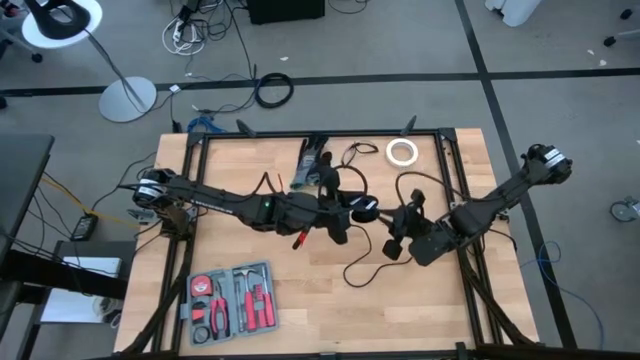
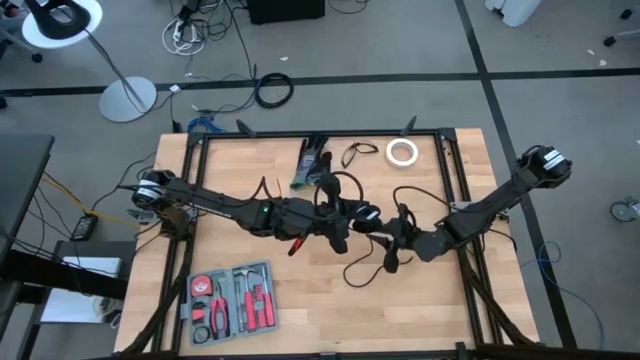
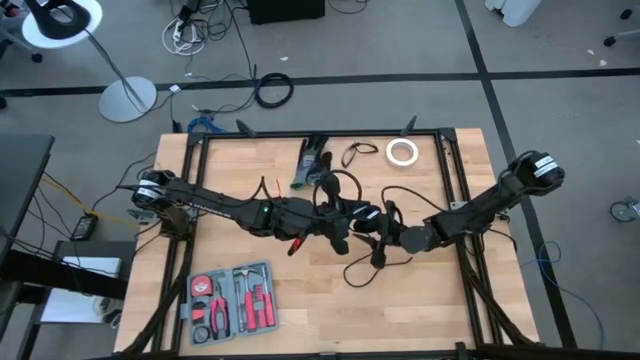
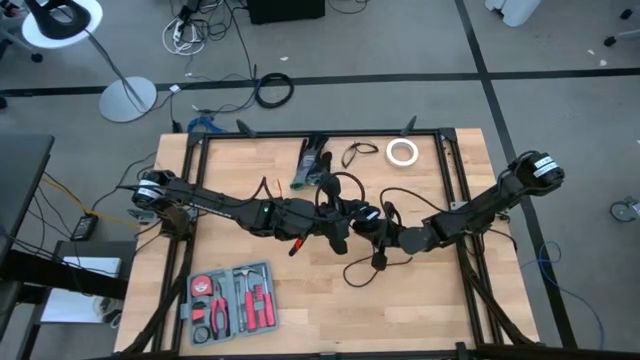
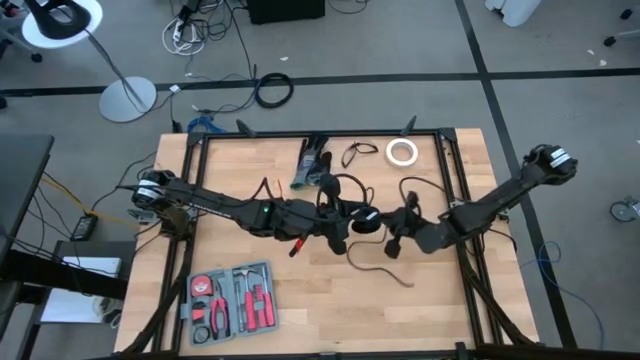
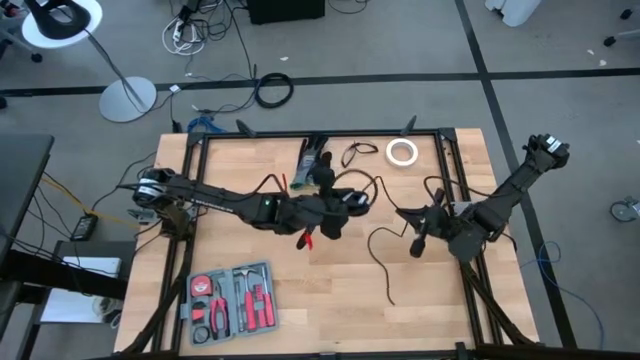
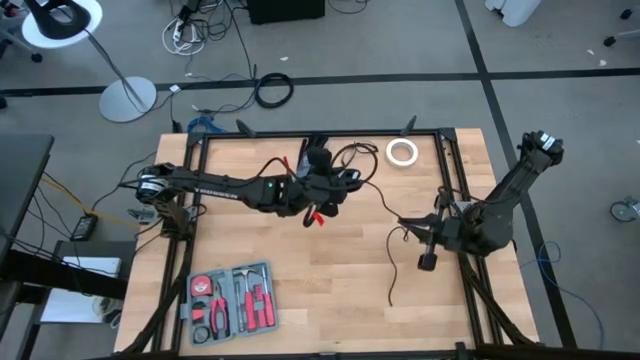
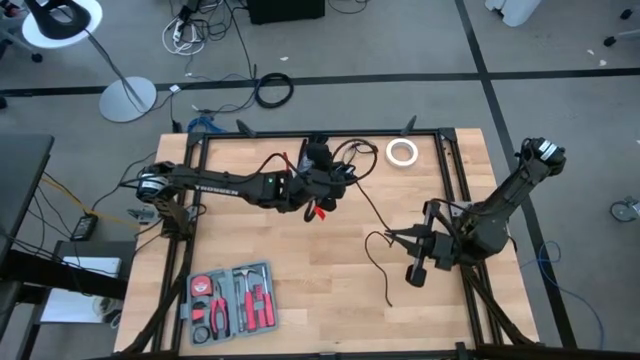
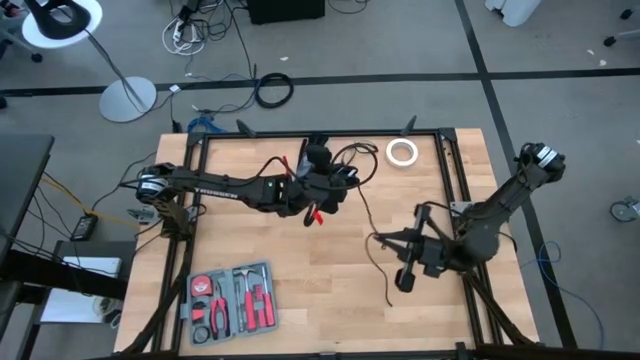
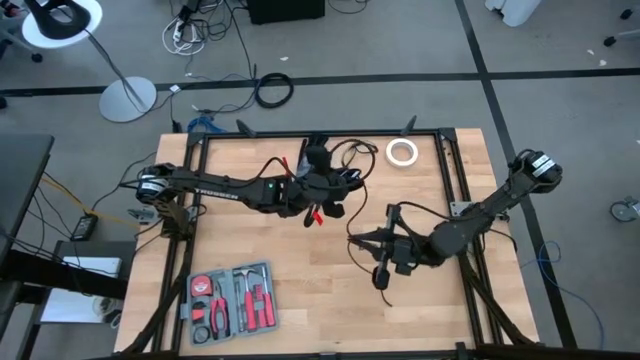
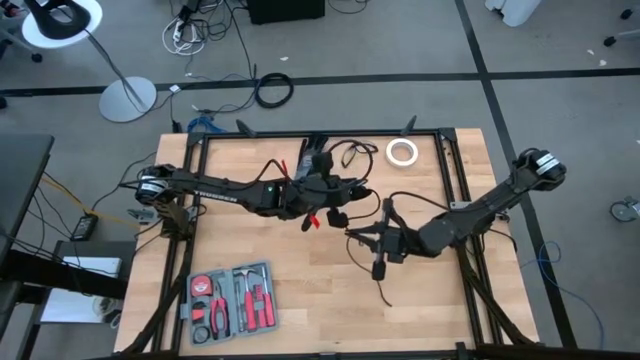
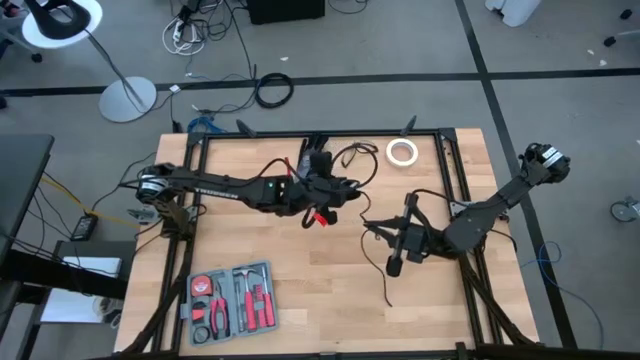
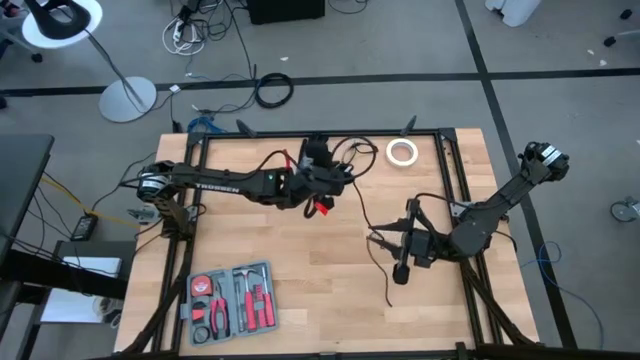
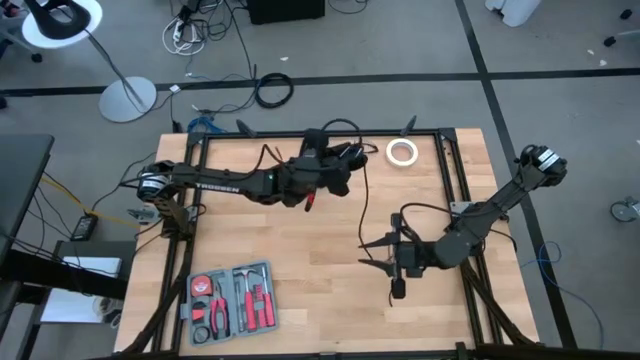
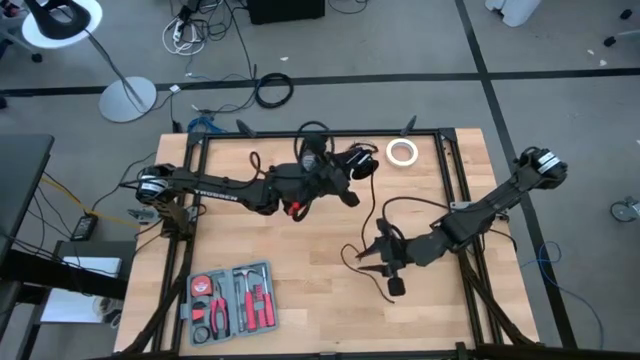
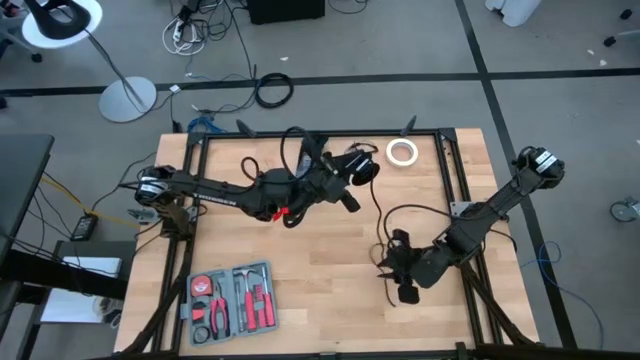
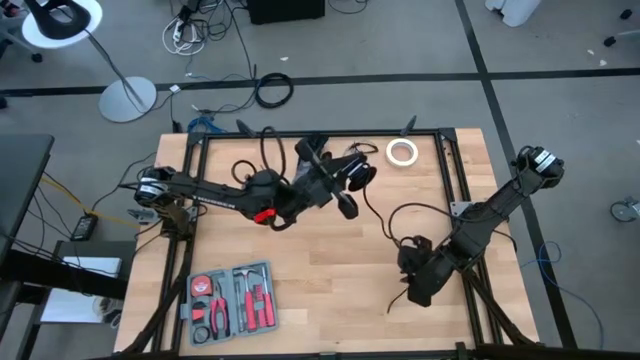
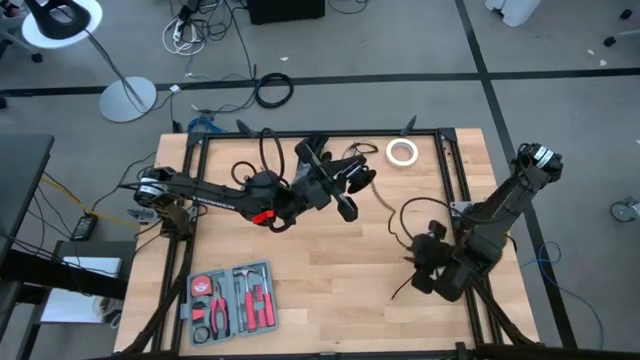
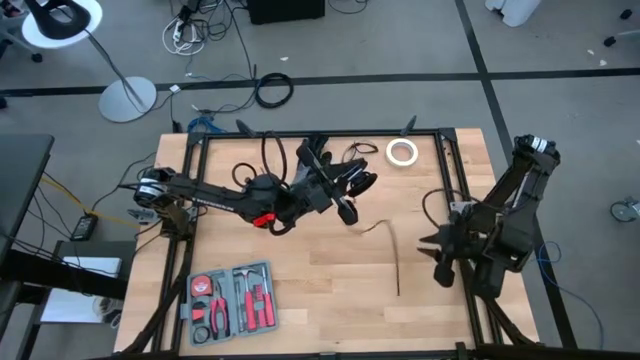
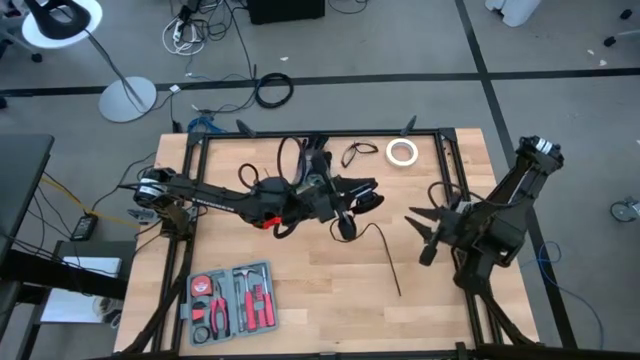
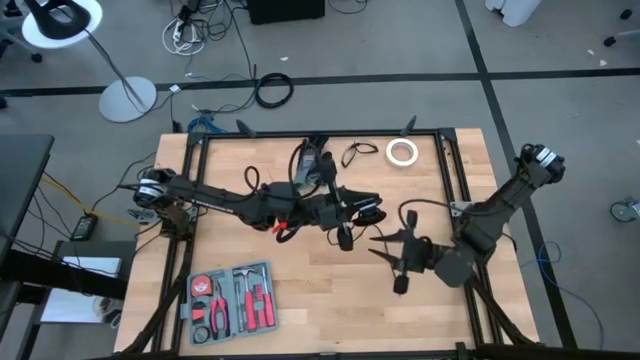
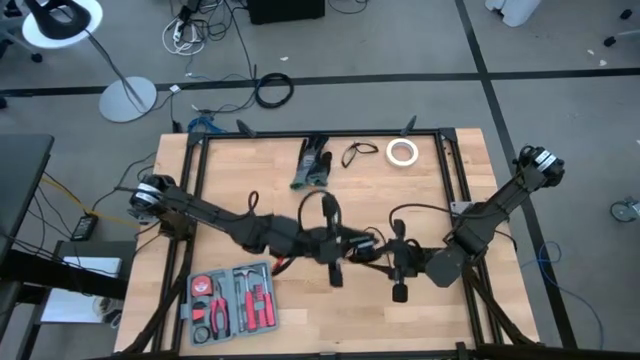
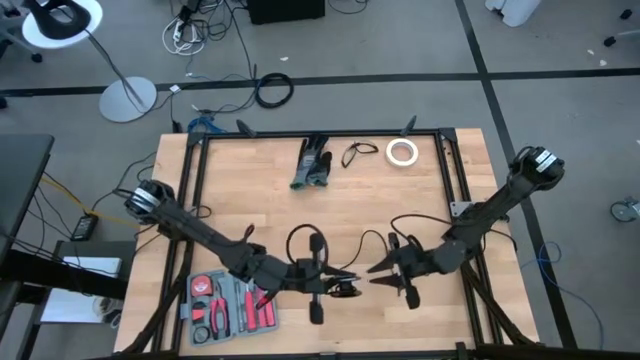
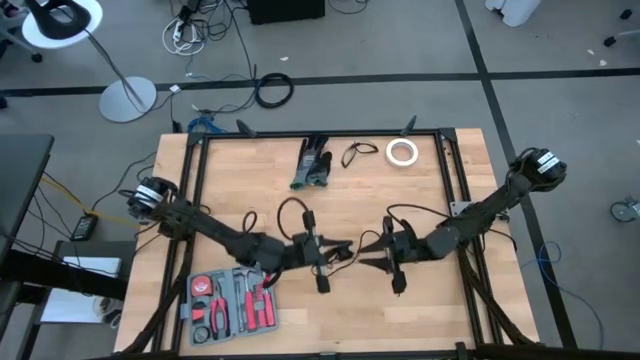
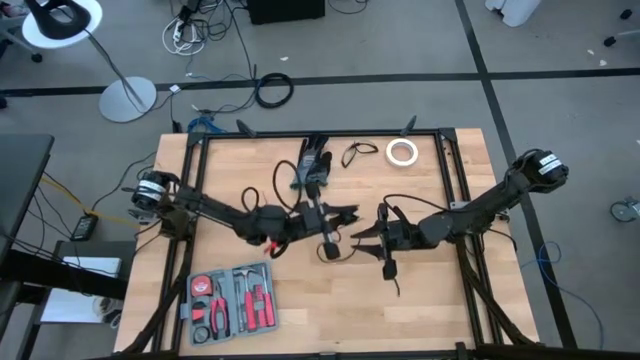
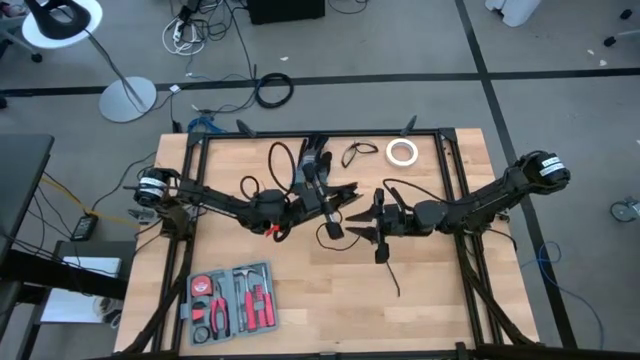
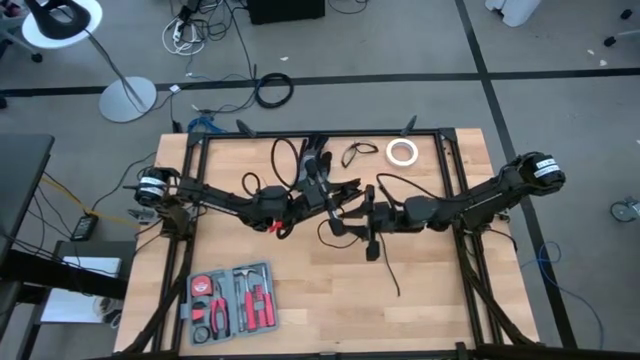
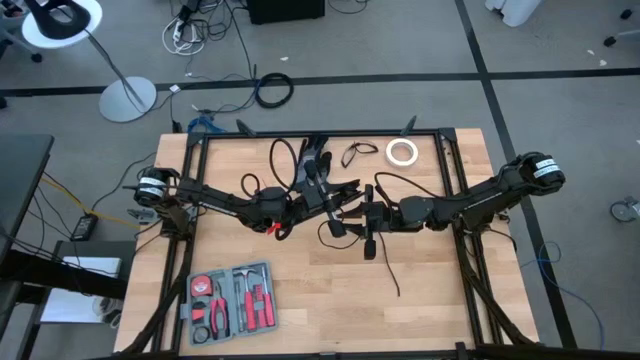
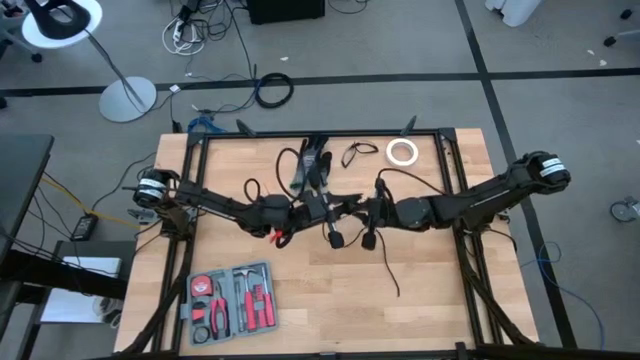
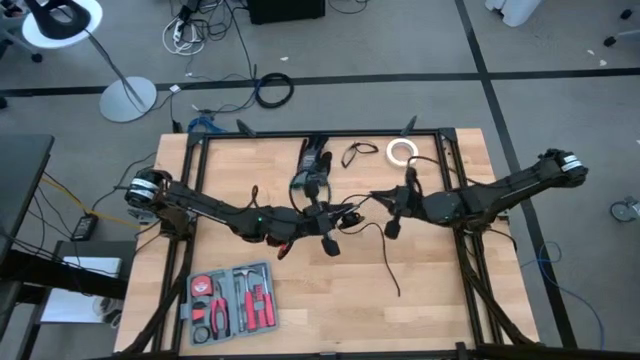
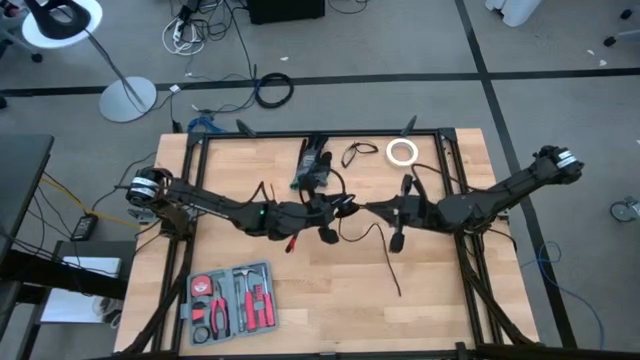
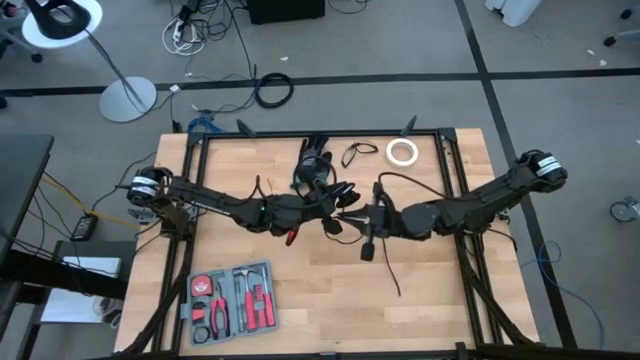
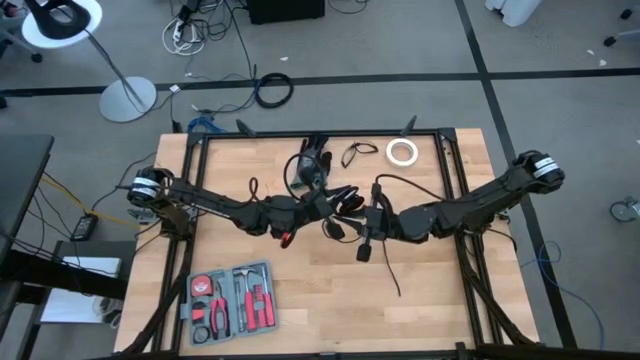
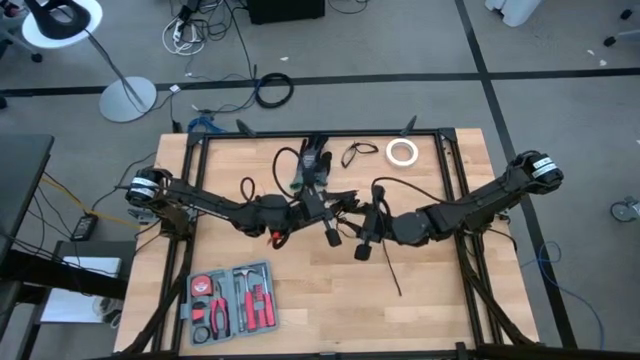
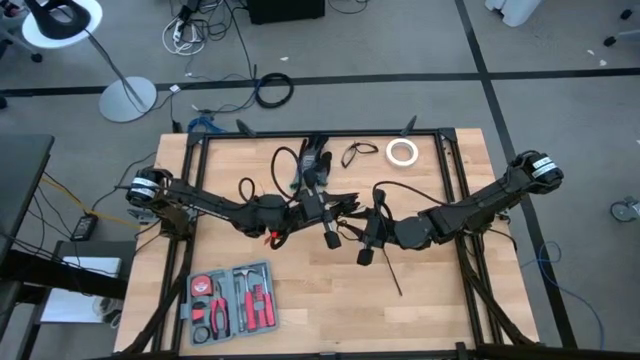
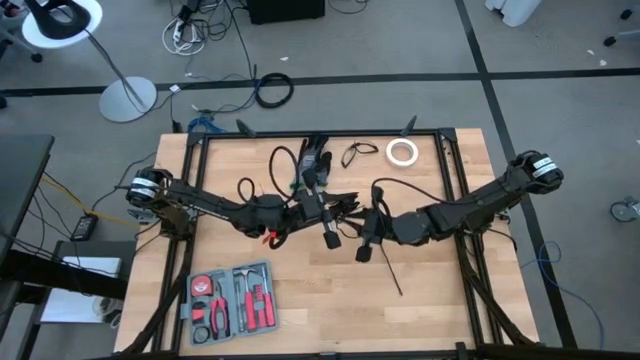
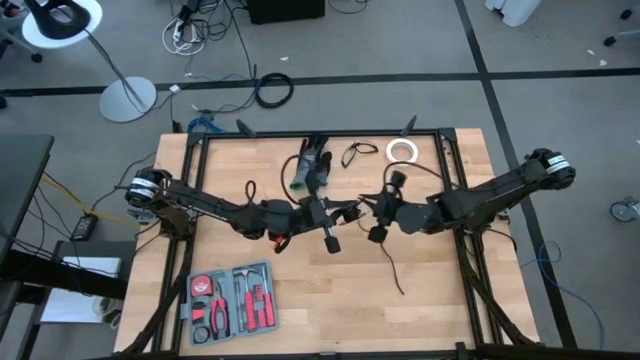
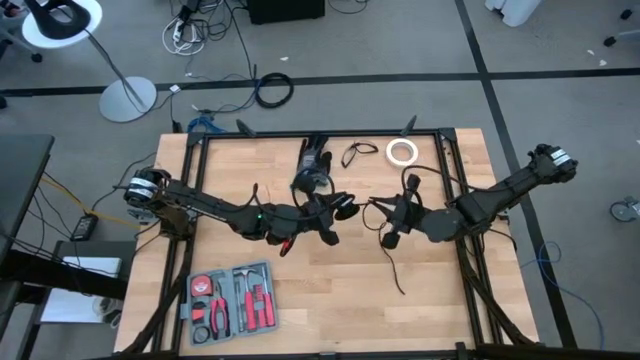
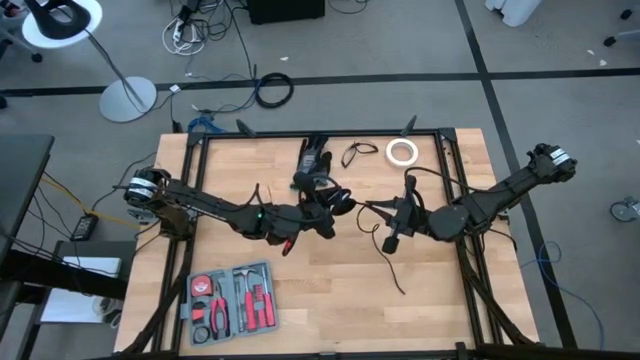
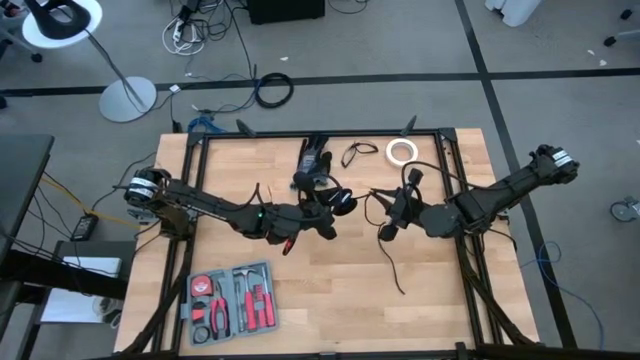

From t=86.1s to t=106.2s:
Task: Coil cords
Coil the black wire into a spool

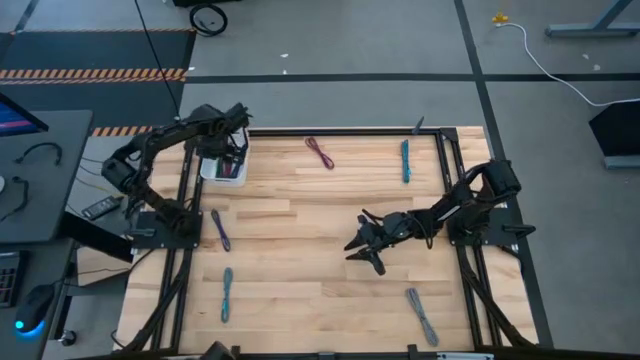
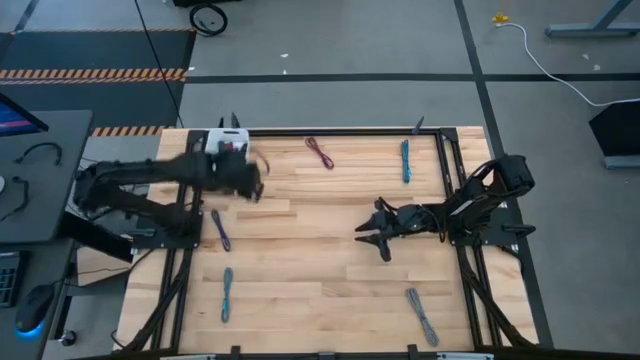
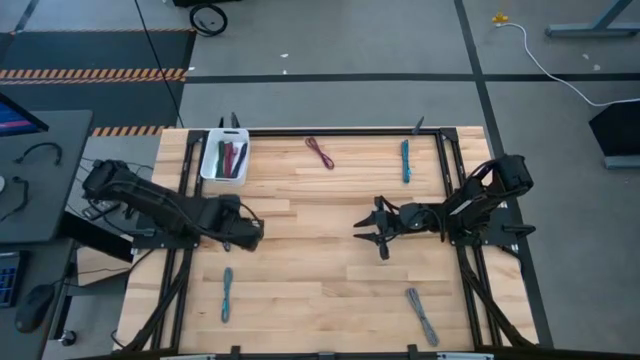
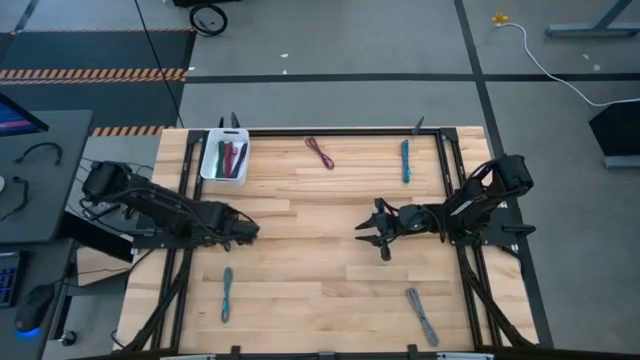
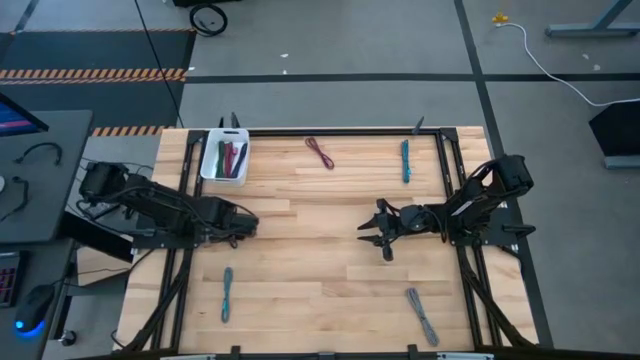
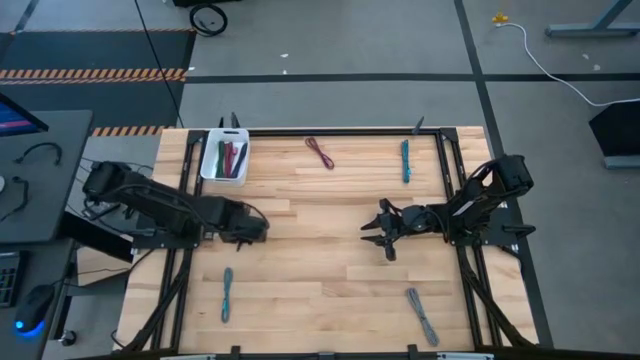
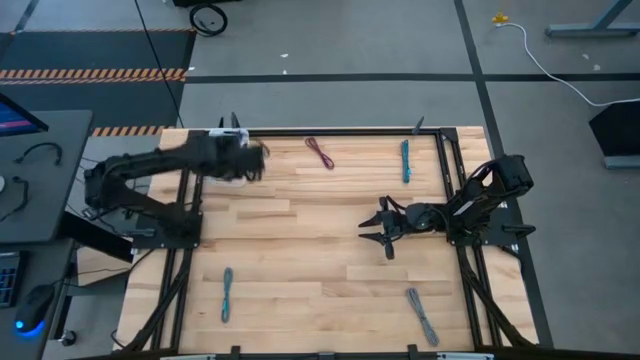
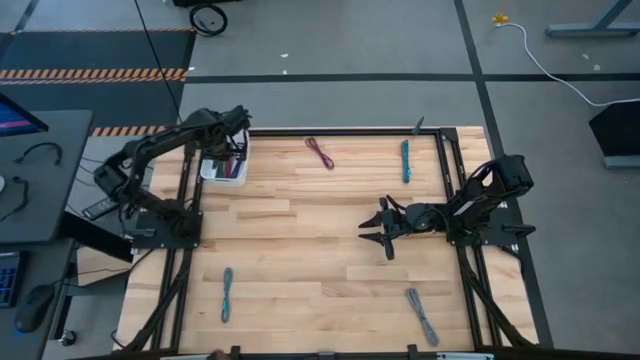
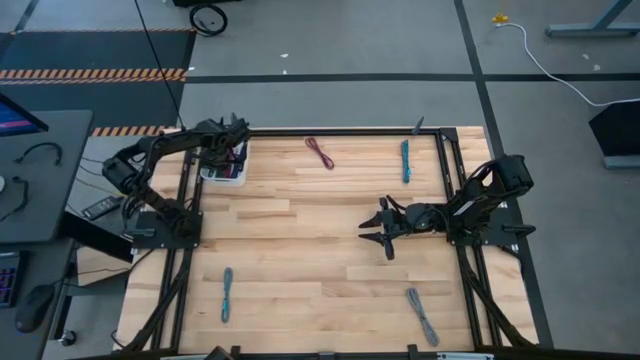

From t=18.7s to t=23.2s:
Task: Pick and place USB-C Cables
Put the purple charger cable into the white bin
